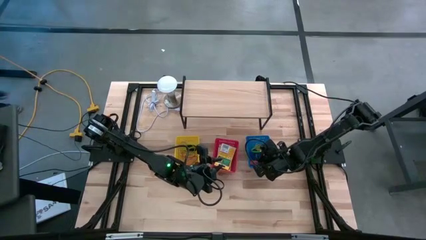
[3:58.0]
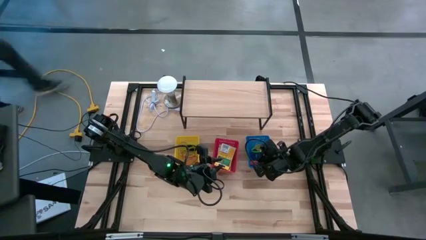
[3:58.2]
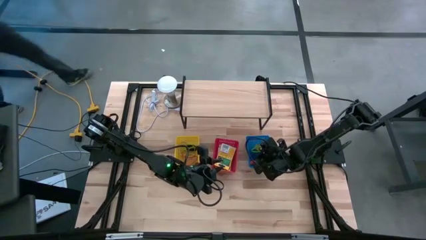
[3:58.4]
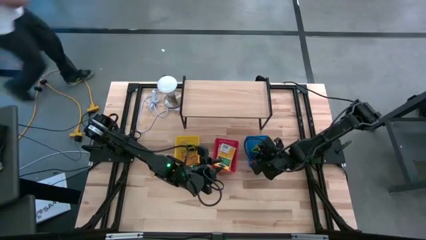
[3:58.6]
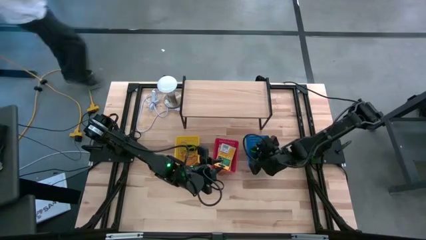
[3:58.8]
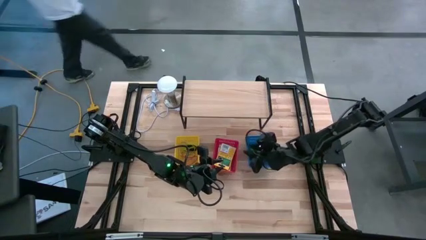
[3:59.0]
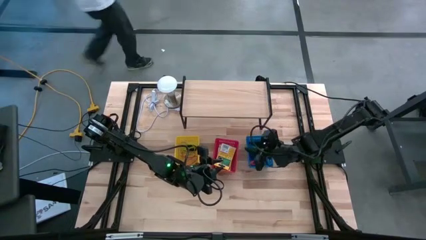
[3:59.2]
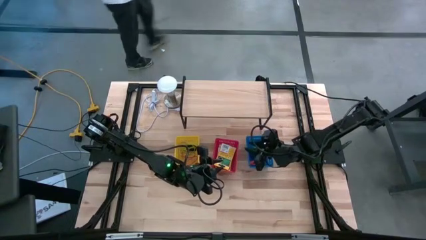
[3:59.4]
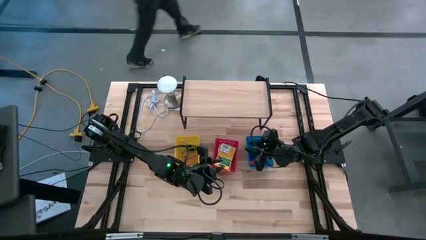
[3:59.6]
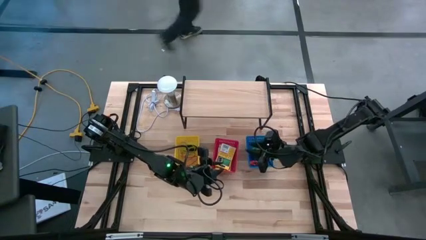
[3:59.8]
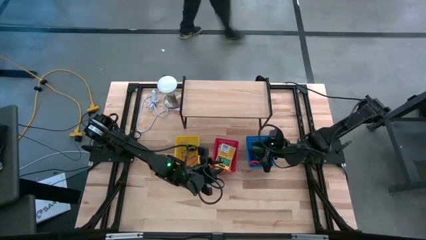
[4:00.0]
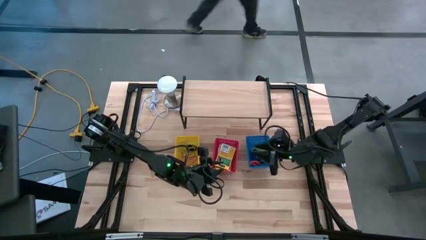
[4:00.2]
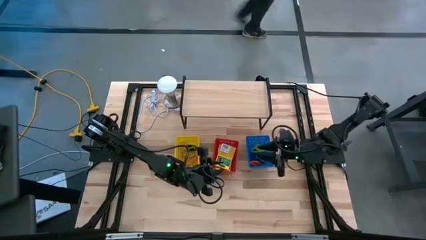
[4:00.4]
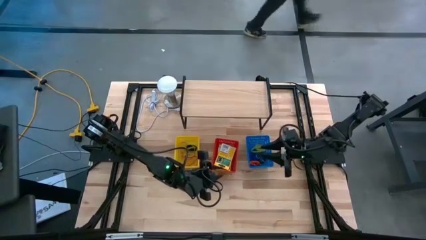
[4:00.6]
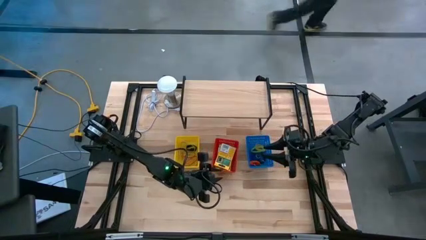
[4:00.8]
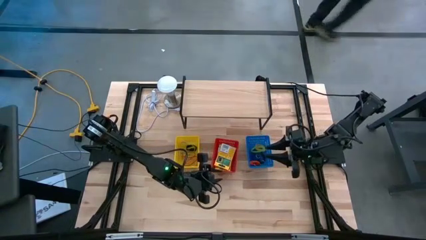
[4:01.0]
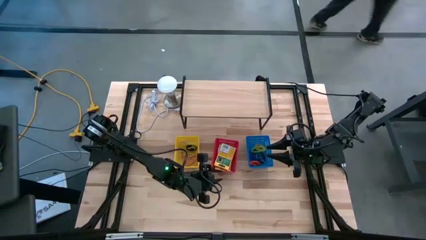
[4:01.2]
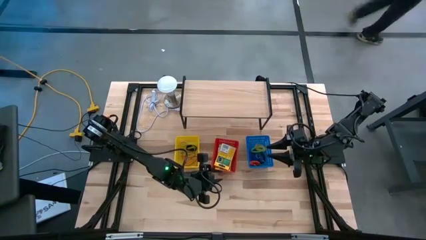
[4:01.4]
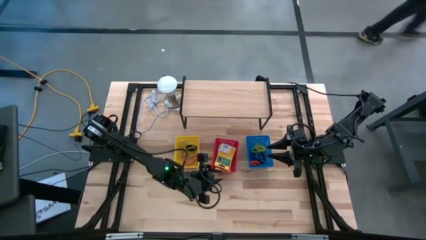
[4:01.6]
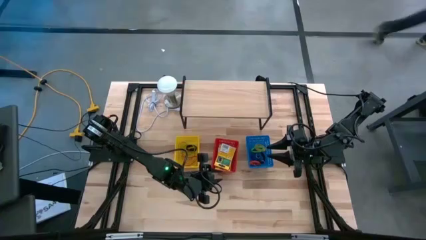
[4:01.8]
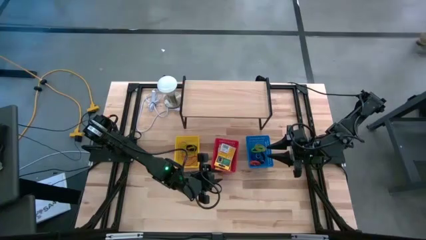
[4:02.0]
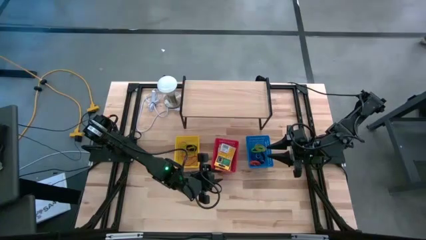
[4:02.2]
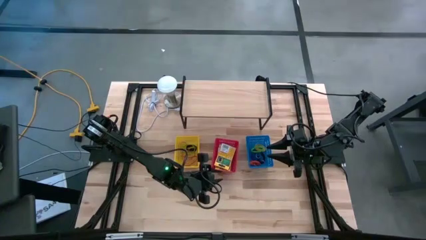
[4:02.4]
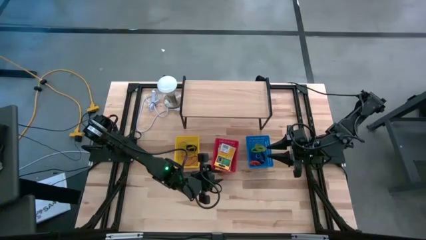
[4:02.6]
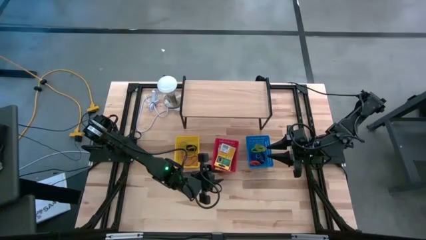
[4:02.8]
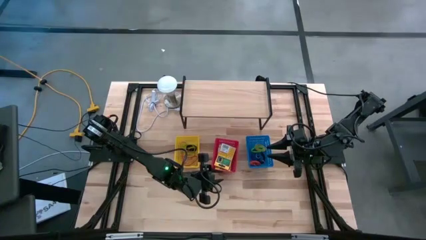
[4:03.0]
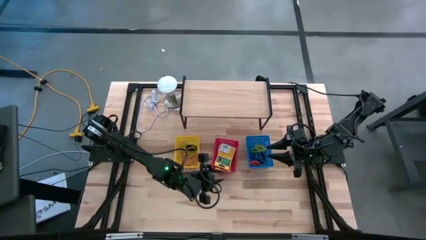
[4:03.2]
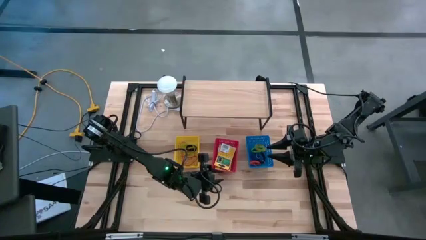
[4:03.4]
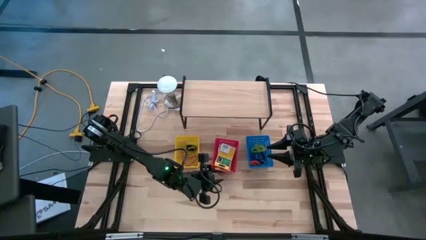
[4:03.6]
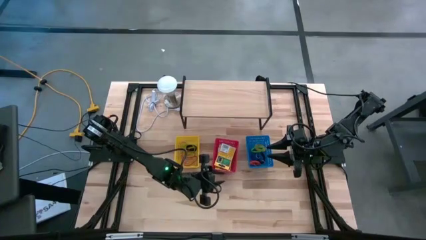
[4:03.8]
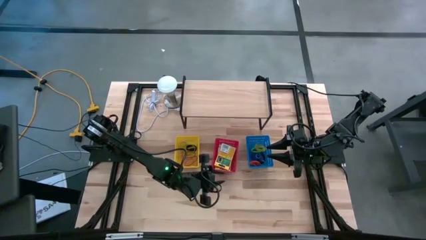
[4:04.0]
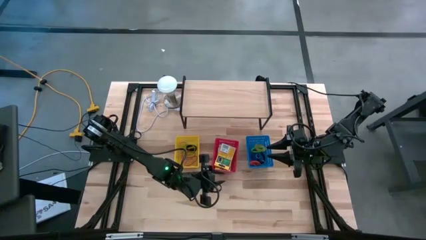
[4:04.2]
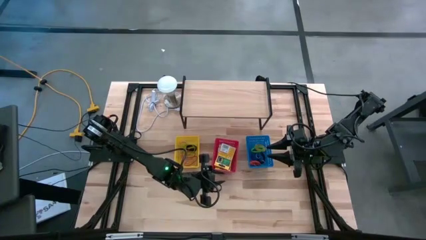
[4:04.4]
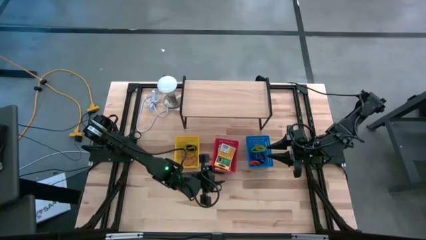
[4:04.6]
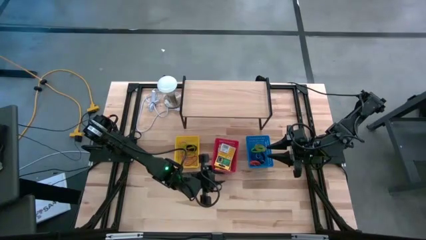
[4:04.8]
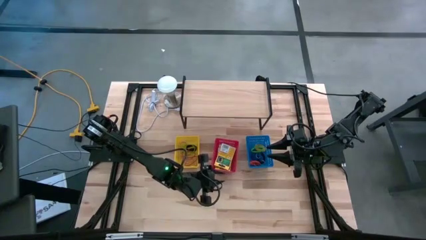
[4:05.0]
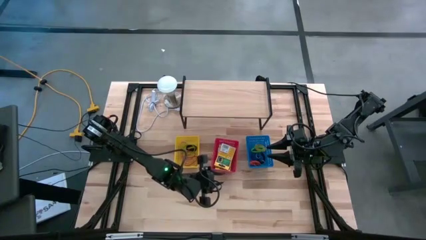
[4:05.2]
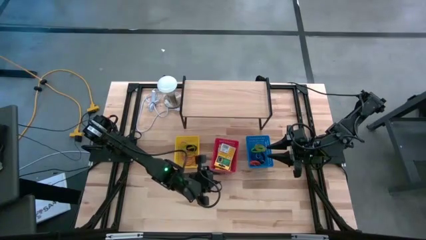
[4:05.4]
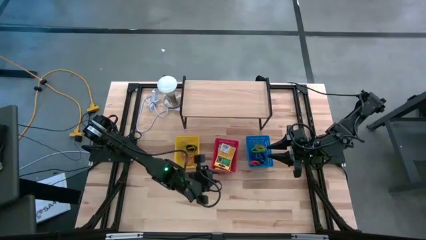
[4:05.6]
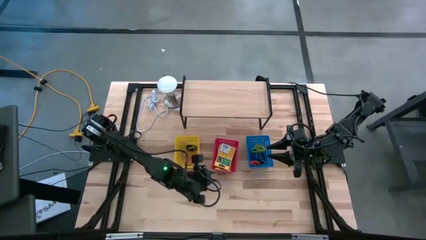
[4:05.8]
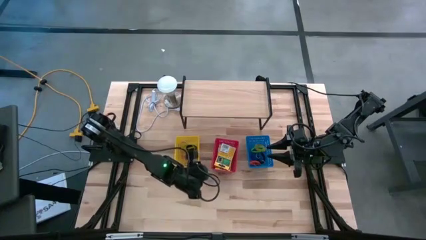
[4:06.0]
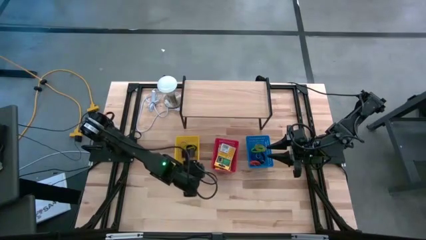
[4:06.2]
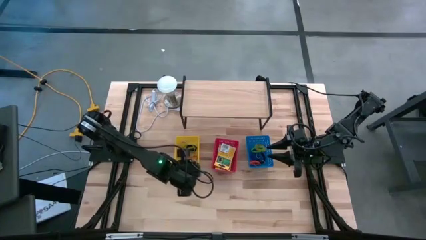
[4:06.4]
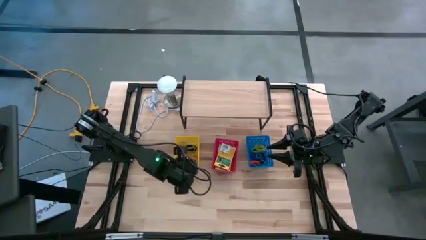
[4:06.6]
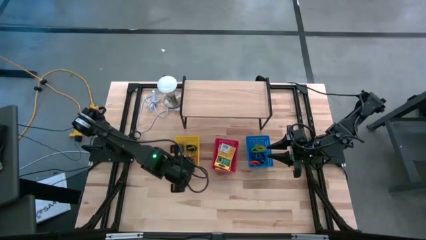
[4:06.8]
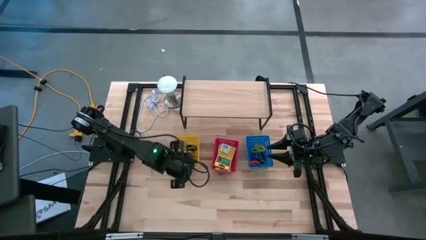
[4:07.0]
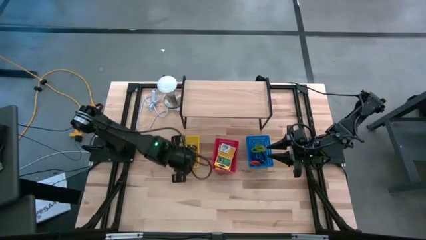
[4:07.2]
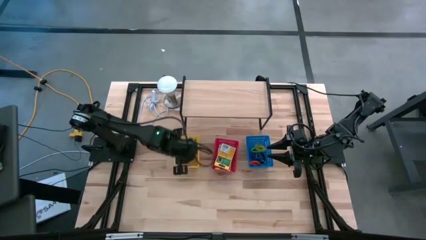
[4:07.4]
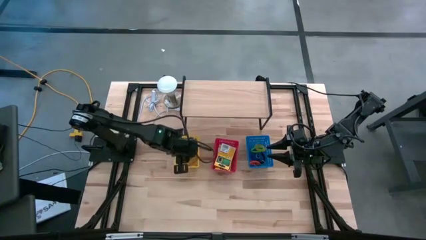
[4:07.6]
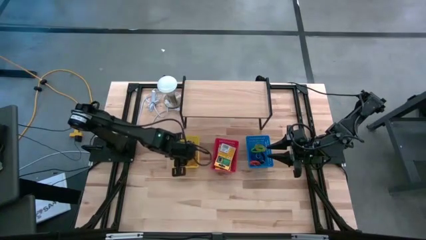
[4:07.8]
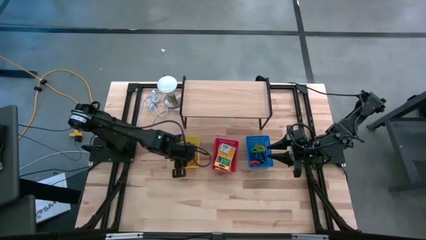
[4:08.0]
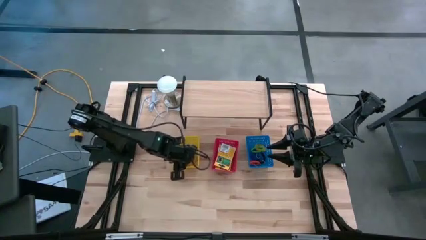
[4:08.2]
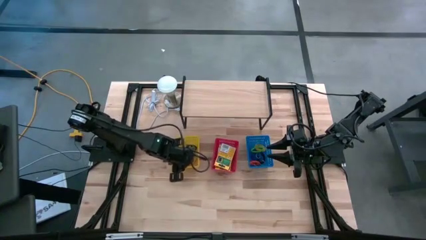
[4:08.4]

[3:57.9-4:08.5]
Task: Pick & Place Office Desk Supplies
Put the yellow bin with the rubber bands on the shelf

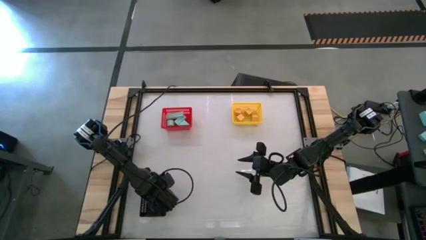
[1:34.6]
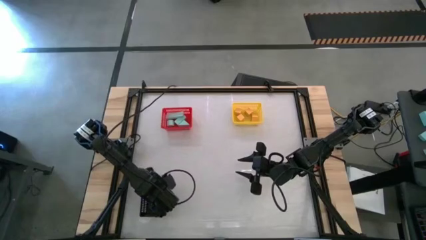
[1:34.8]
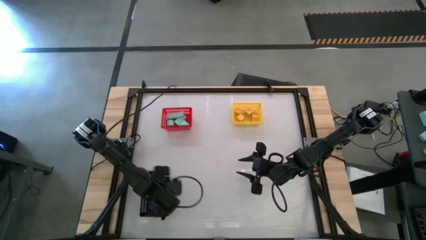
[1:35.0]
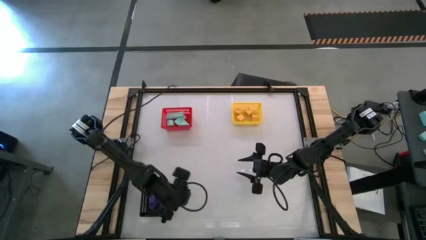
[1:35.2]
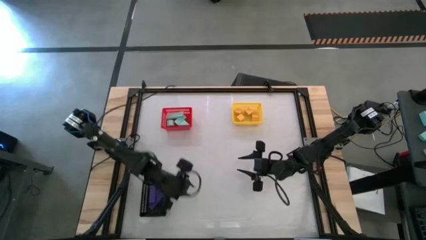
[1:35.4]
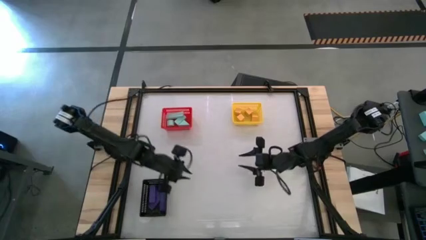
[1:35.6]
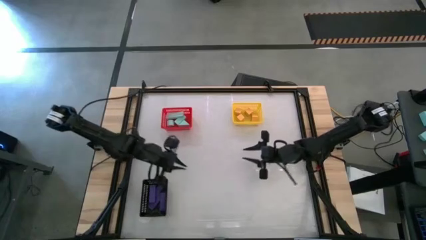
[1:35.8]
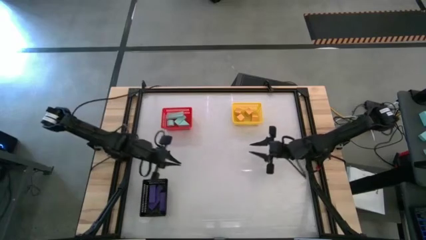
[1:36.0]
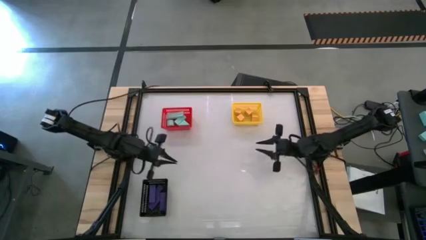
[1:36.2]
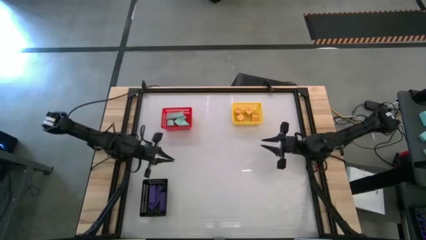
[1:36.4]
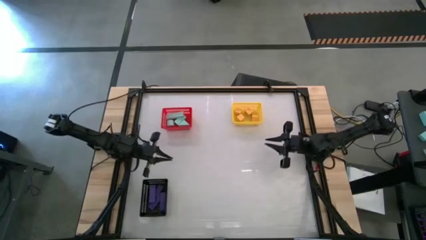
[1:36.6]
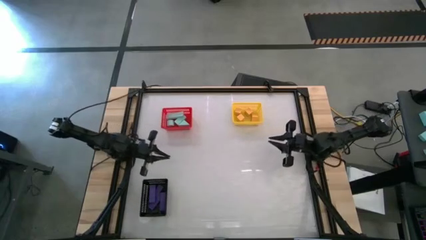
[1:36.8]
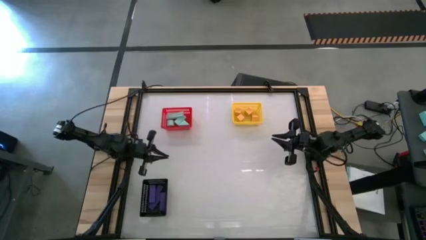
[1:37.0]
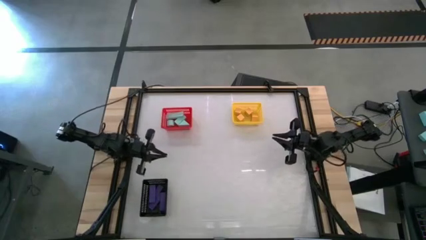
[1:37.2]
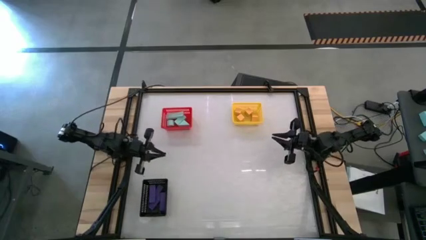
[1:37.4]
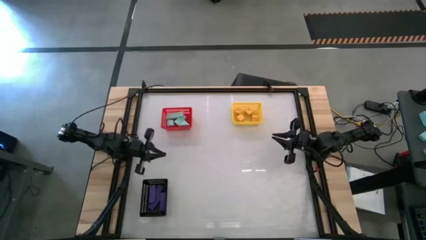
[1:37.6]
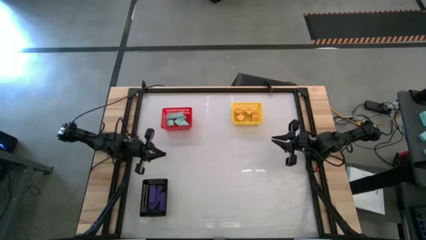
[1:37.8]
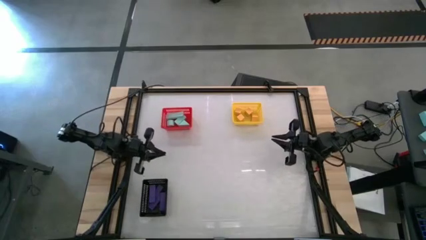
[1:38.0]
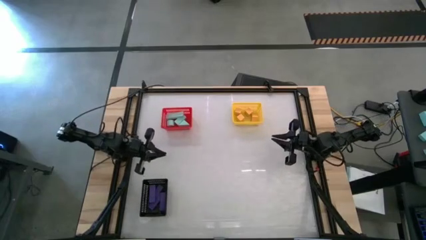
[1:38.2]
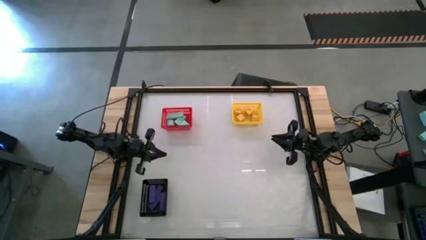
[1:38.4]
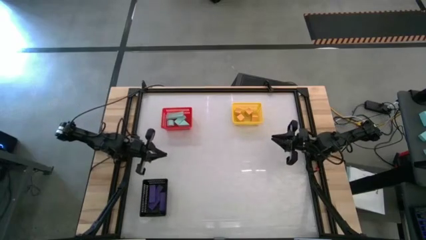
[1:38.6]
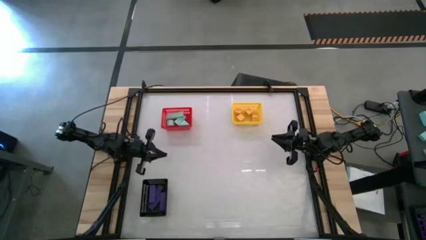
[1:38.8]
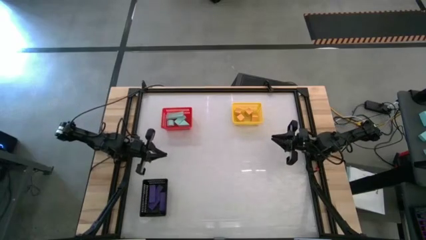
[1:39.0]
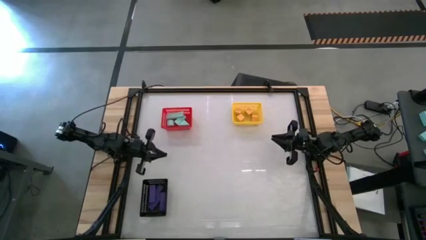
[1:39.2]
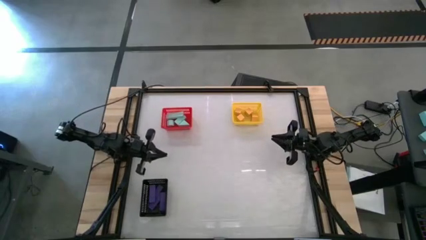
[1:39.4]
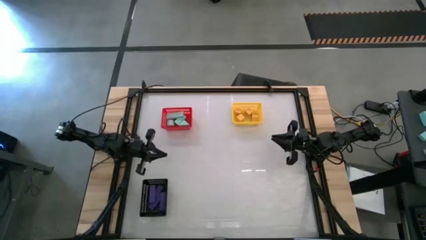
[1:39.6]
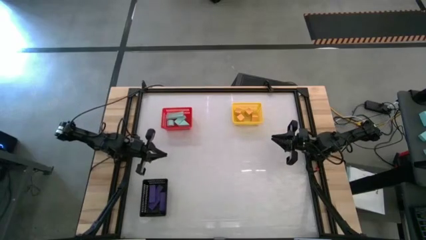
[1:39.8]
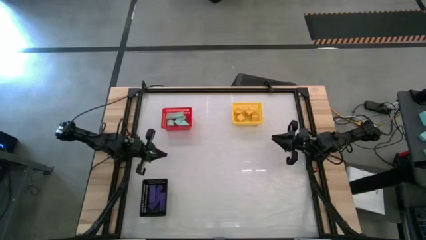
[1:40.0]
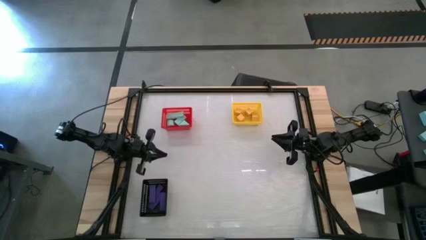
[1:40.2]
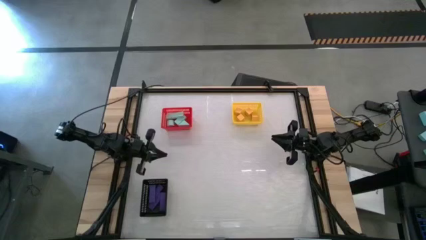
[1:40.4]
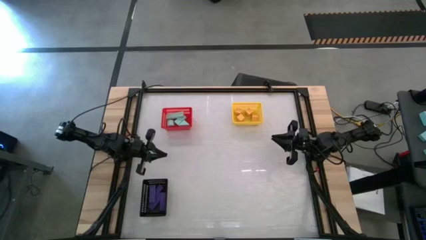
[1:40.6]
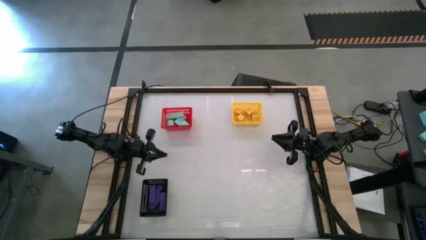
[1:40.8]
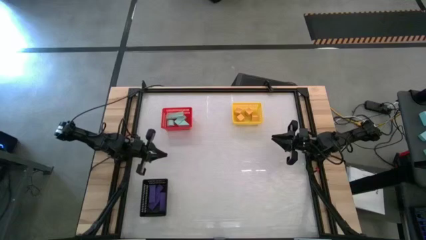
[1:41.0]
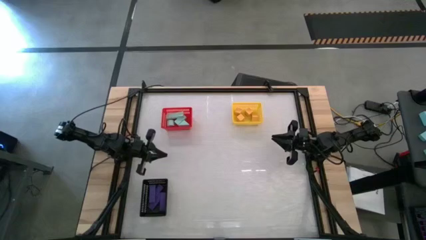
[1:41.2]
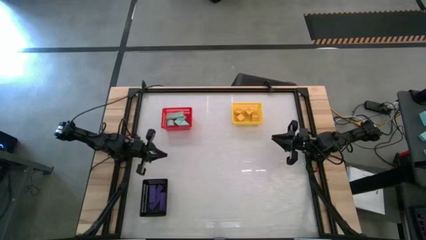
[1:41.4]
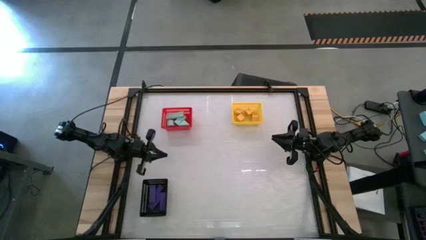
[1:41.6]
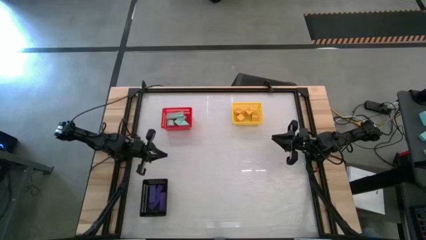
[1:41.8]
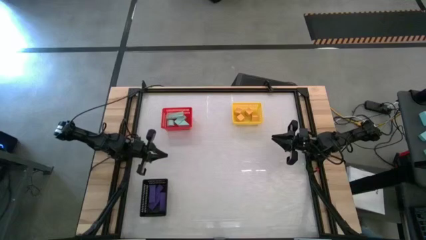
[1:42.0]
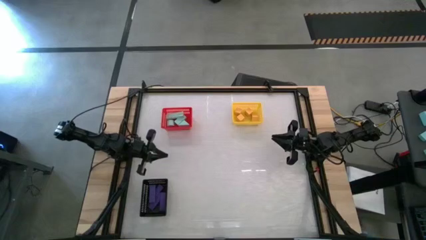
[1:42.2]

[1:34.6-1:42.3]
Task: Sort & place blocks by color
Return to Home Position
